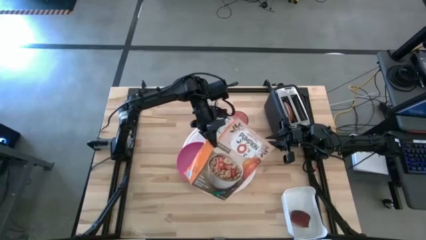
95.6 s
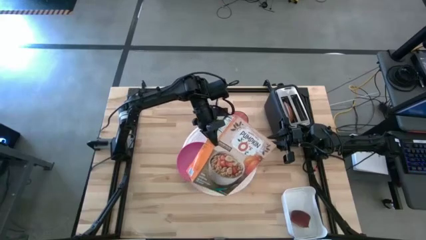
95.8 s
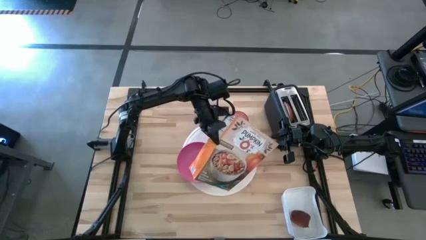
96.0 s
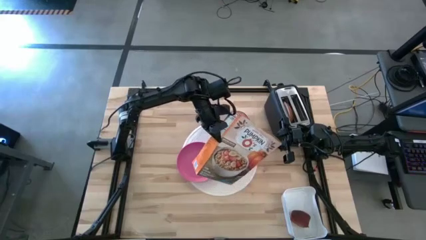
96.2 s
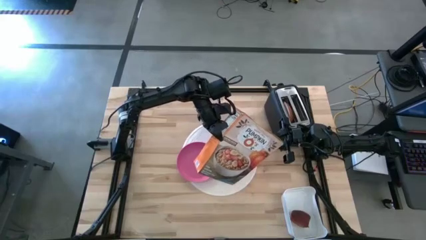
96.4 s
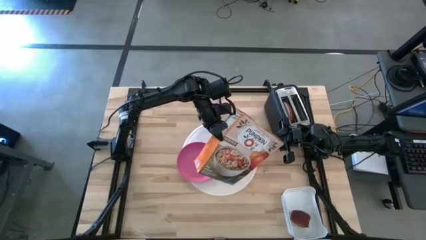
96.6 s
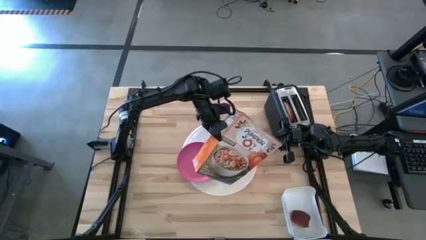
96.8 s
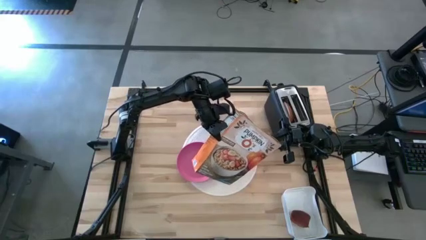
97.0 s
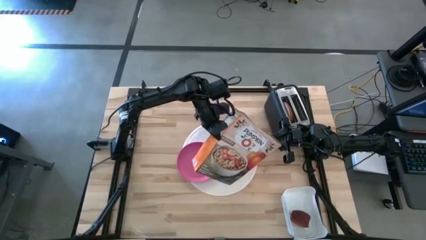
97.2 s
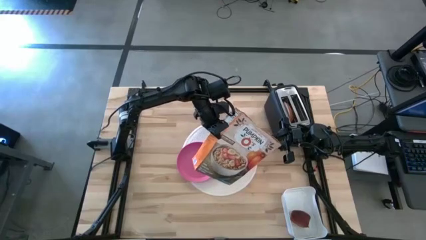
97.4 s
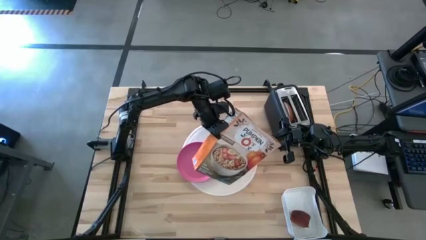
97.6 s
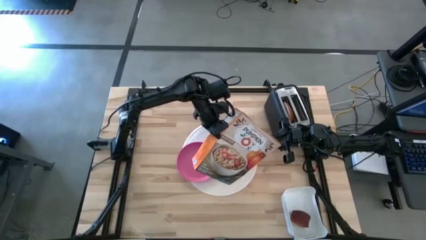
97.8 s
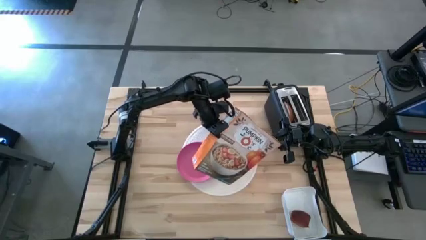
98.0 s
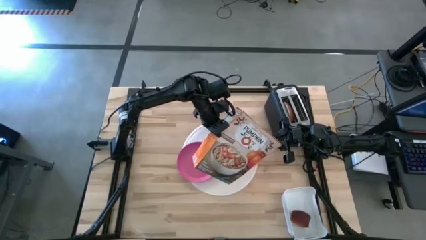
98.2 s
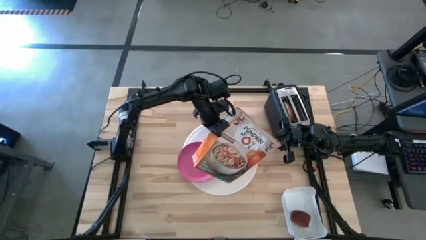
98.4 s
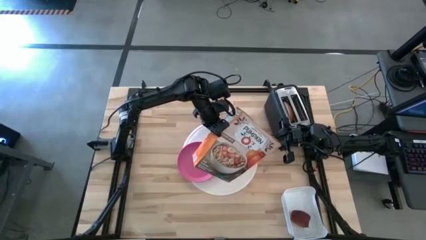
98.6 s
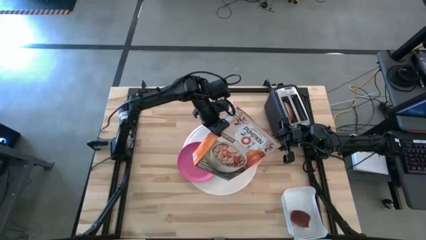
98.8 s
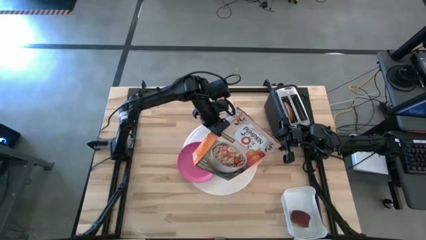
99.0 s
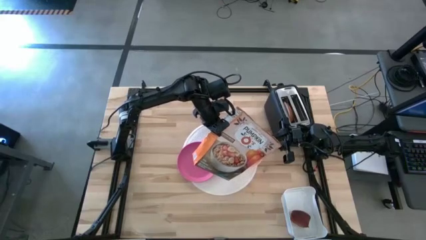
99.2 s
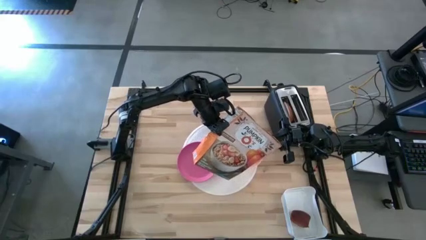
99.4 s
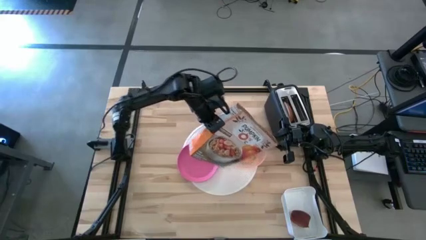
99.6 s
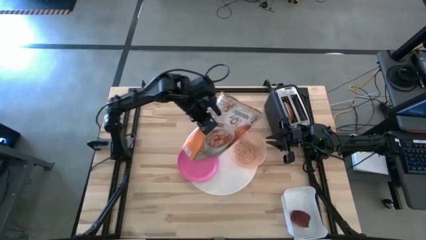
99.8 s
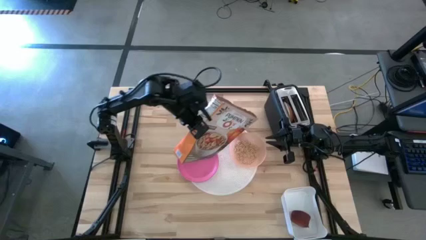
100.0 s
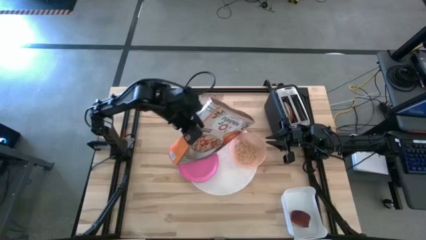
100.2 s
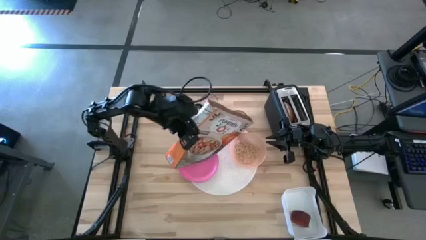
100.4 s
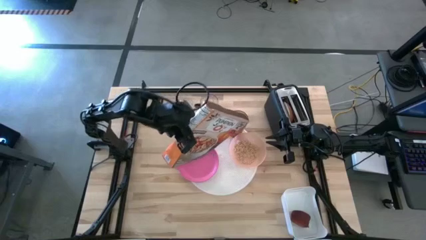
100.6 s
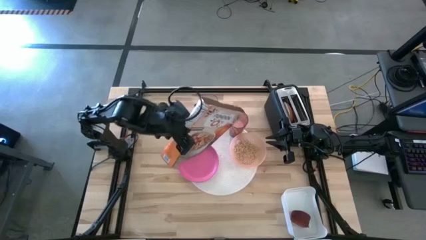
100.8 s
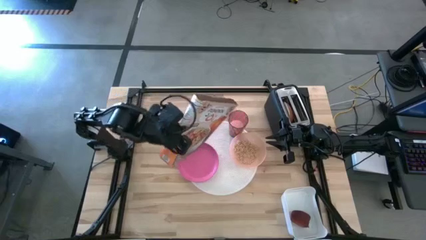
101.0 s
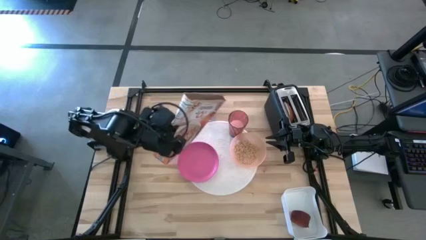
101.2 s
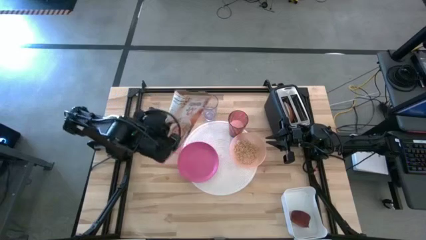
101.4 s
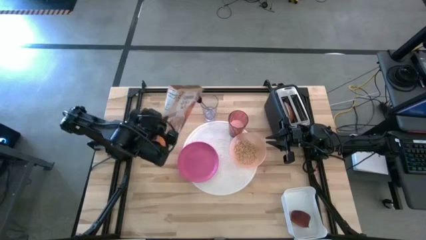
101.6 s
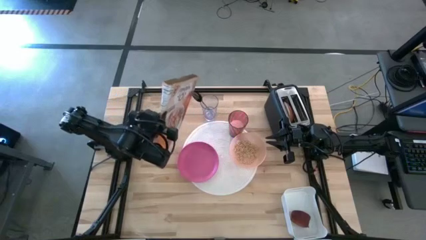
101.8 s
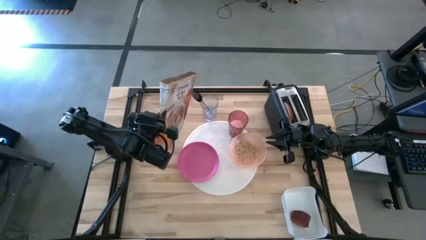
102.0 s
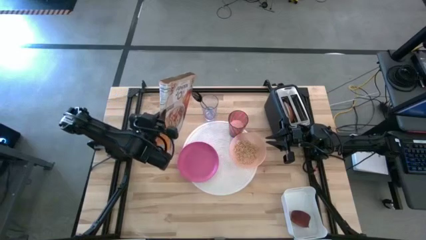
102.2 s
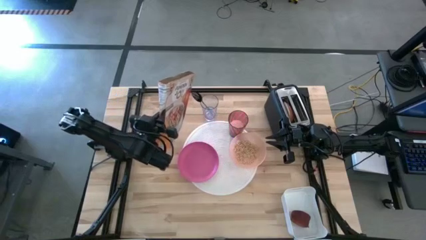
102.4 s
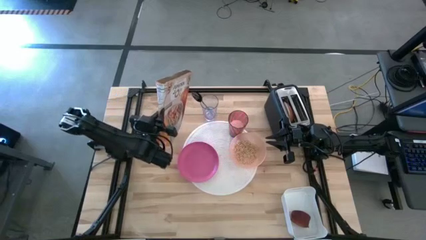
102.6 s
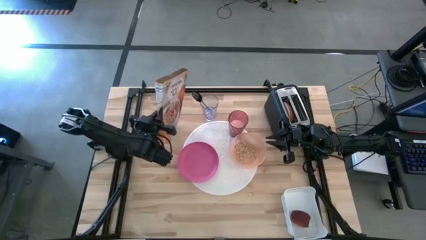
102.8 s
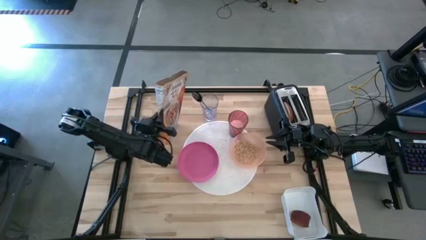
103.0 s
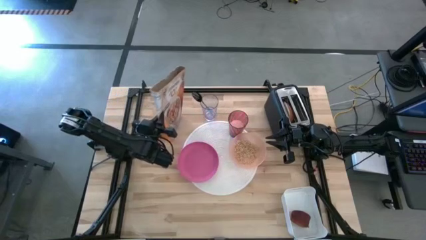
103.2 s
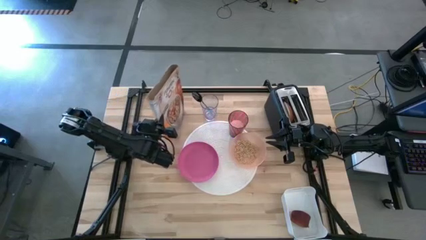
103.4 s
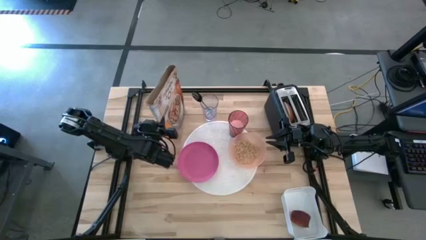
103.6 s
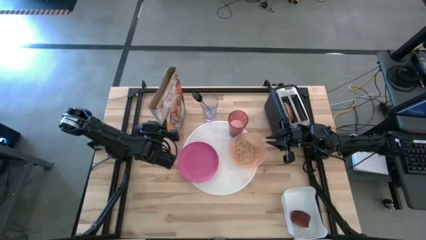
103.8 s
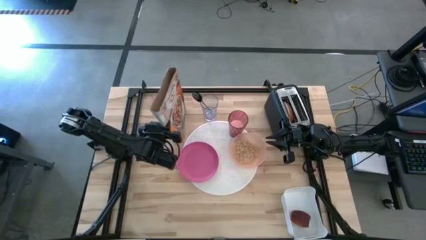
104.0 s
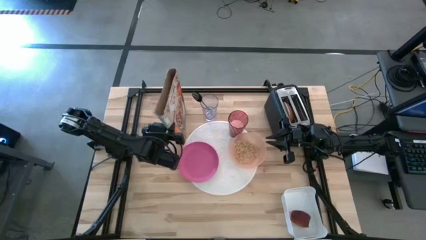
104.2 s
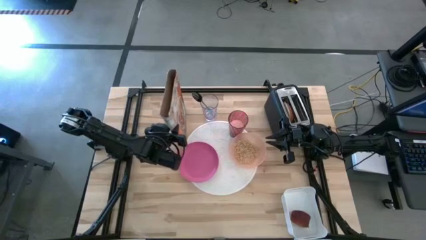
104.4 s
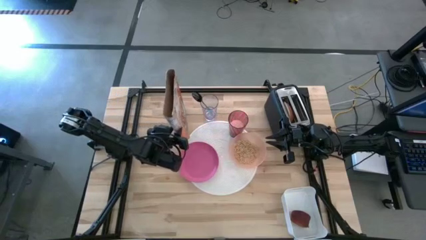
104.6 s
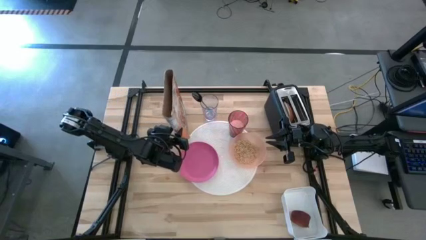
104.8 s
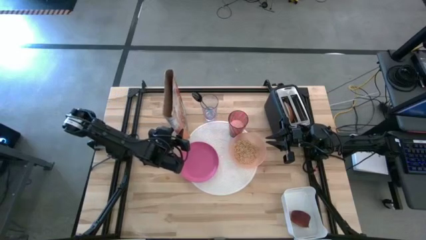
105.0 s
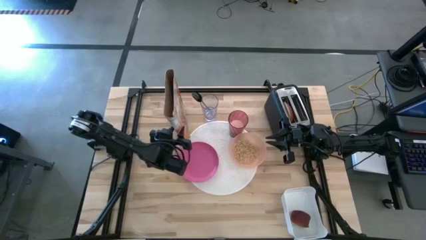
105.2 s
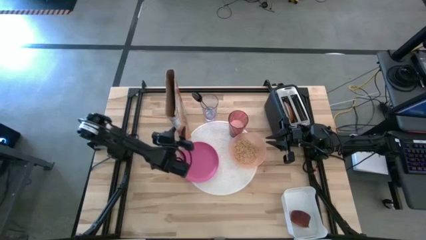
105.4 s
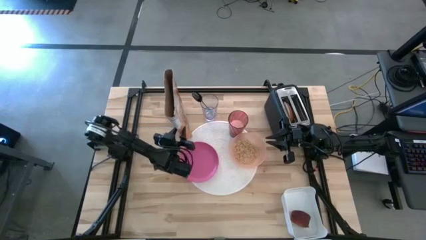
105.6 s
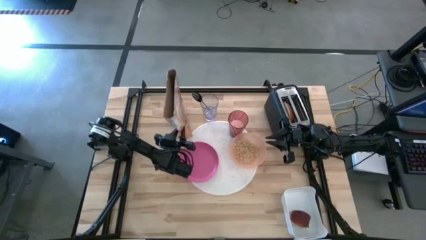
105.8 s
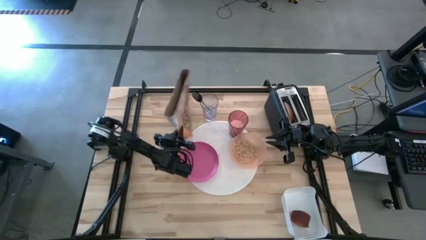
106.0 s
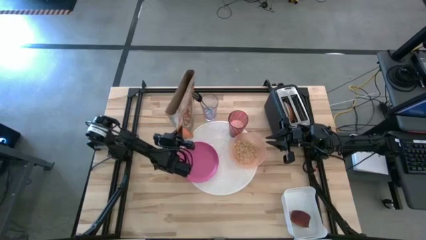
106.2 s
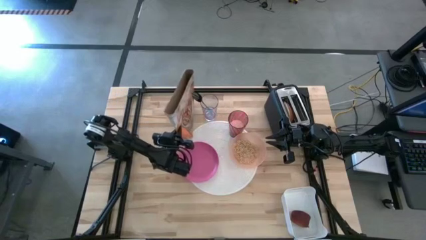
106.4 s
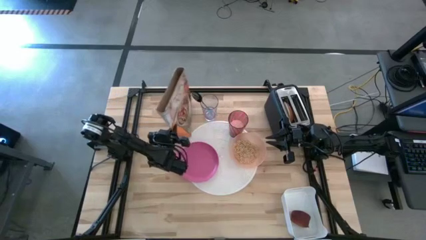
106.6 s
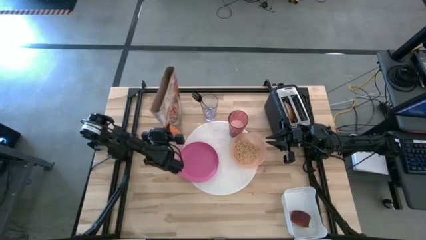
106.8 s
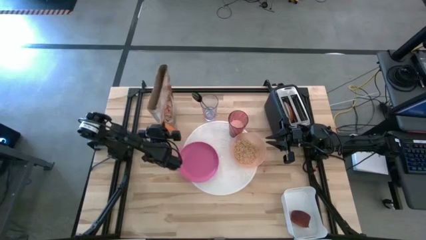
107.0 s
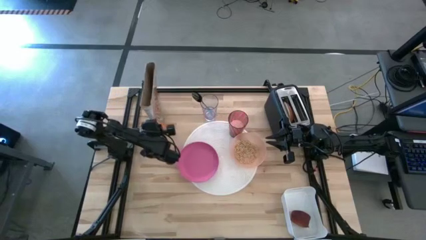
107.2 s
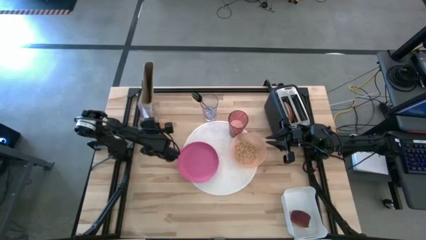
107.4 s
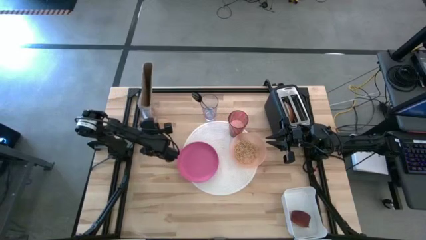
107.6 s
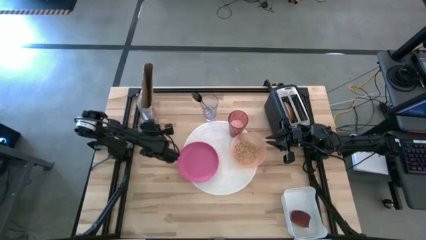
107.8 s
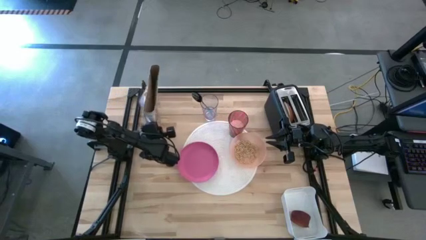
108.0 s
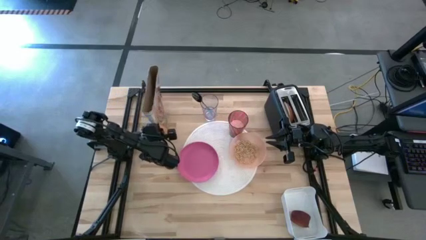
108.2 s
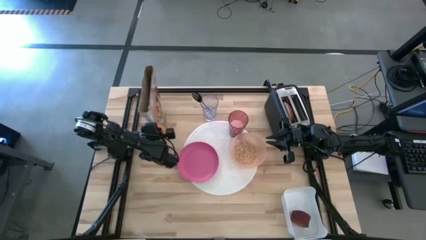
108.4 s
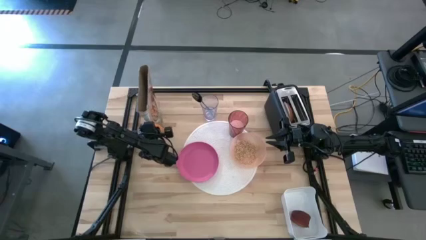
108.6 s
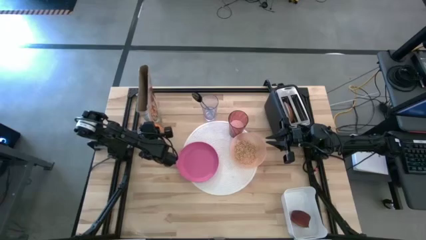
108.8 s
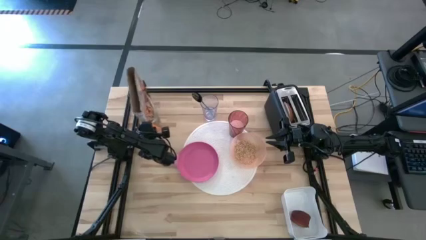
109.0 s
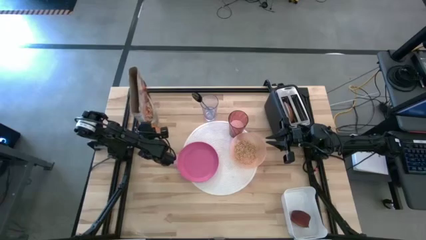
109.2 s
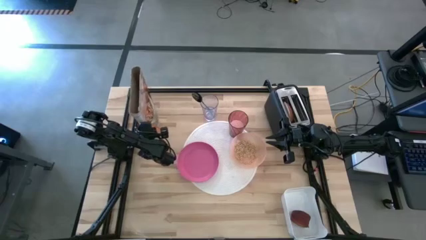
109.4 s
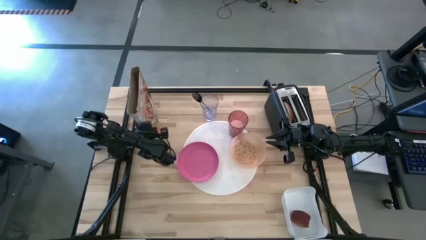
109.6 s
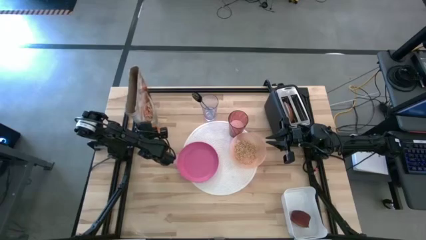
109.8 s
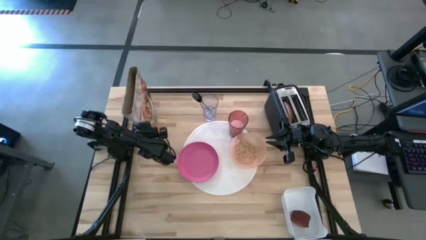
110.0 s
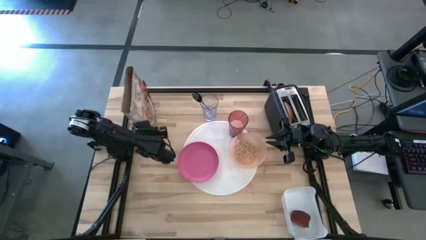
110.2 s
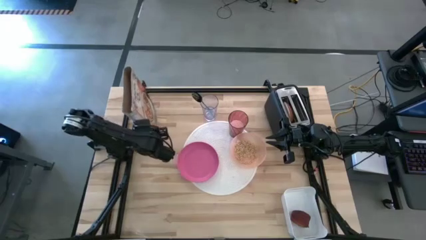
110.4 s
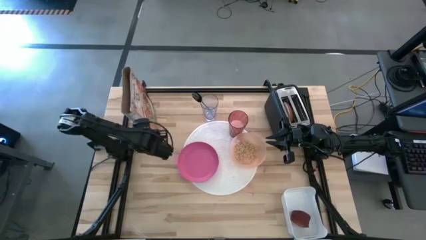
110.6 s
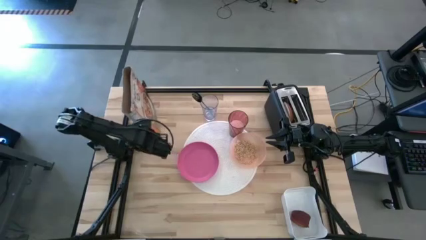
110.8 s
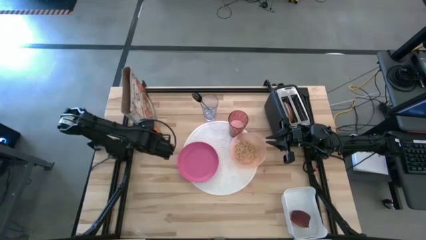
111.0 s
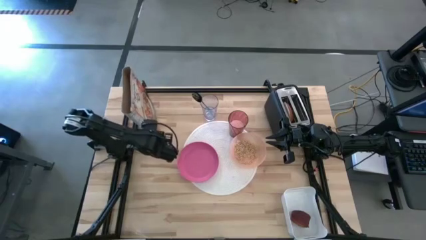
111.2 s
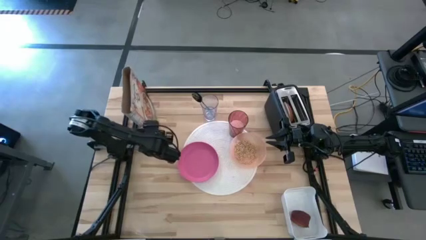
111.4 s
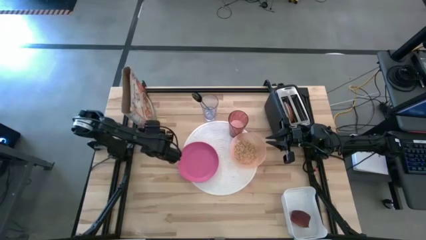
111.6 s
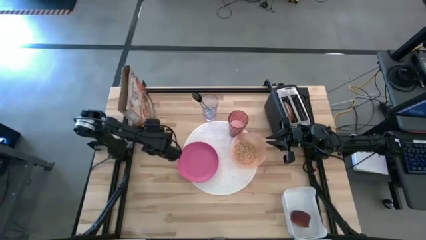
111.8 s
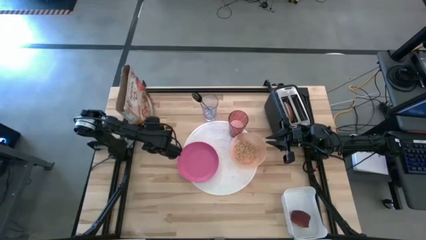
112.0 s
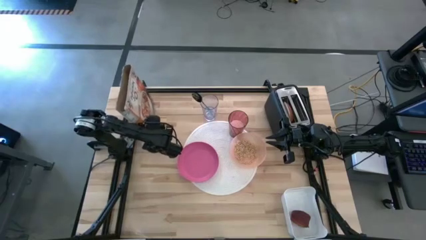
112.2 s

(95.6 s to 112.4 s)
Task: Arrange a breakfast setting
Pour the cereal from the orange cereal box into the orange bowl
